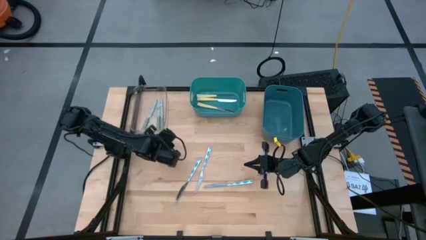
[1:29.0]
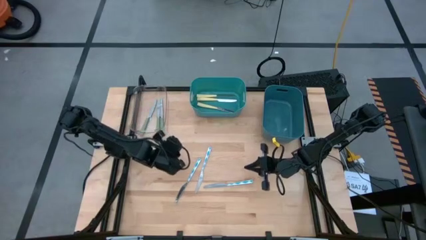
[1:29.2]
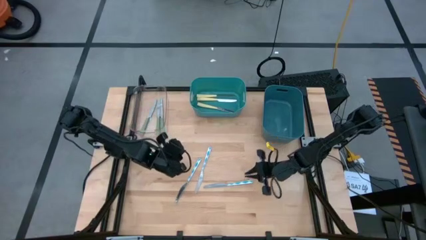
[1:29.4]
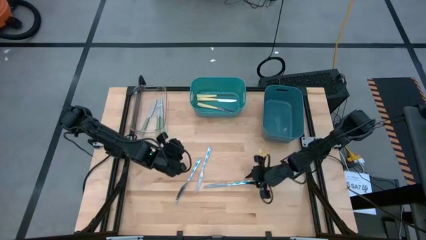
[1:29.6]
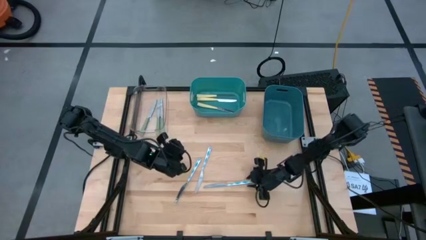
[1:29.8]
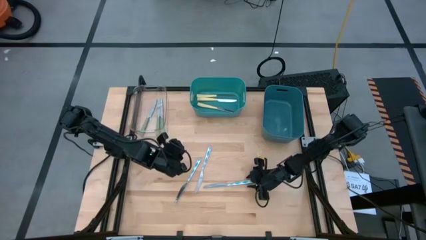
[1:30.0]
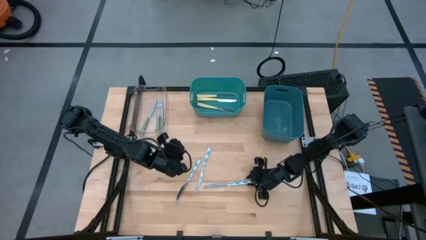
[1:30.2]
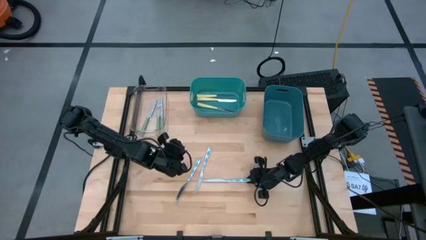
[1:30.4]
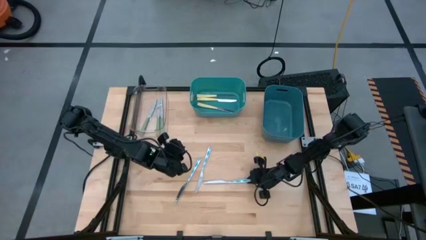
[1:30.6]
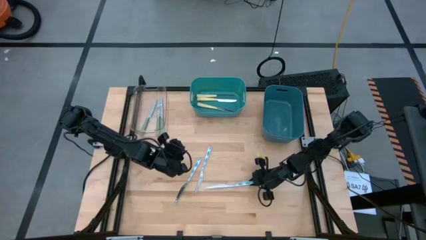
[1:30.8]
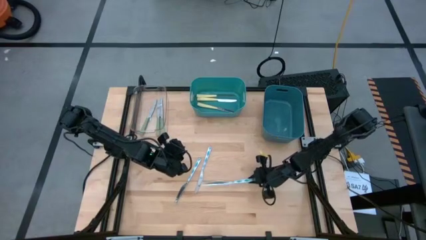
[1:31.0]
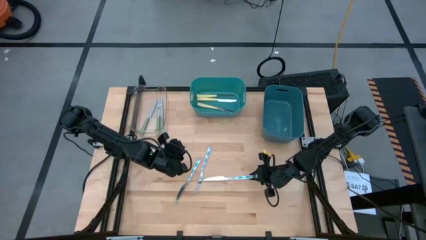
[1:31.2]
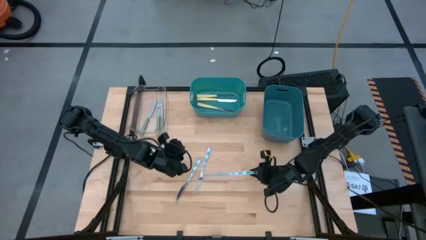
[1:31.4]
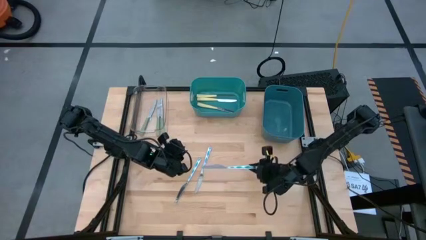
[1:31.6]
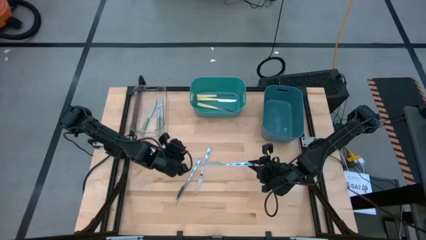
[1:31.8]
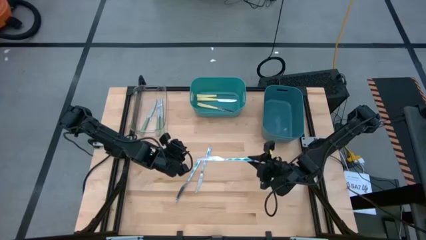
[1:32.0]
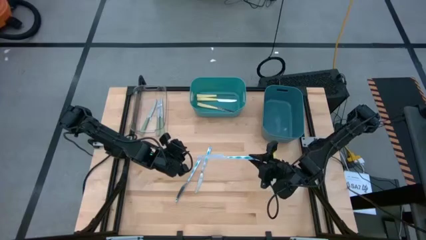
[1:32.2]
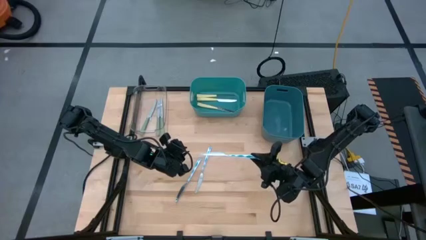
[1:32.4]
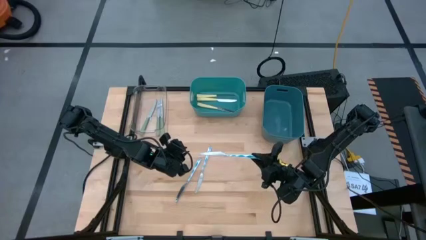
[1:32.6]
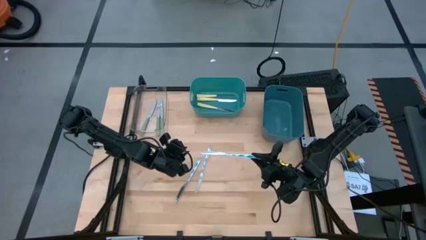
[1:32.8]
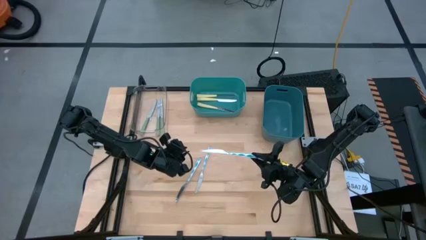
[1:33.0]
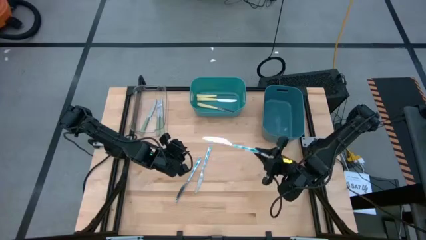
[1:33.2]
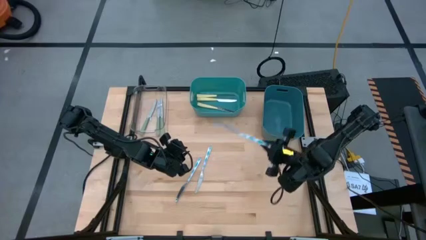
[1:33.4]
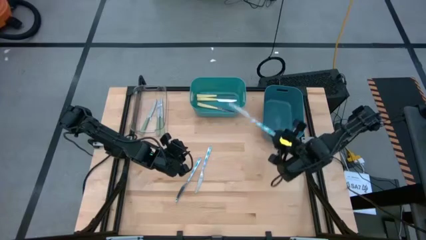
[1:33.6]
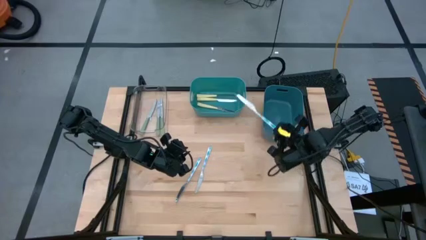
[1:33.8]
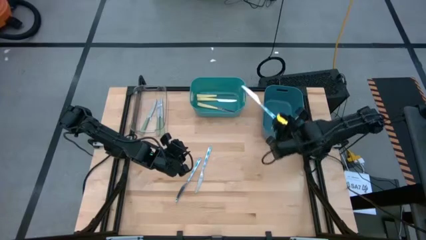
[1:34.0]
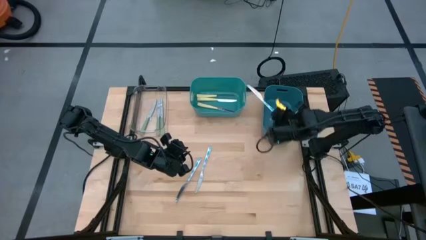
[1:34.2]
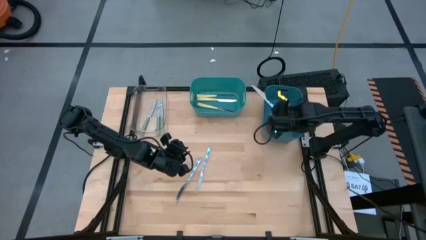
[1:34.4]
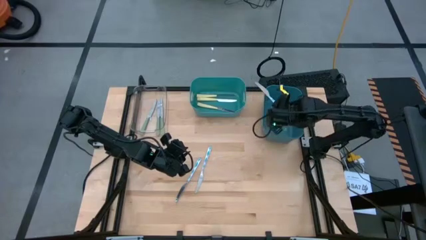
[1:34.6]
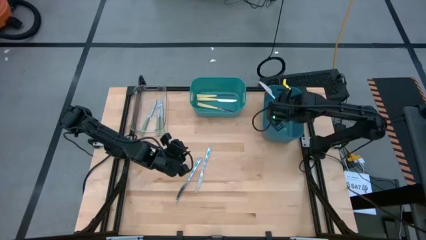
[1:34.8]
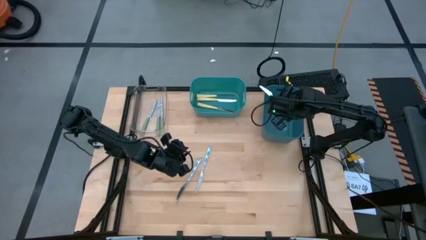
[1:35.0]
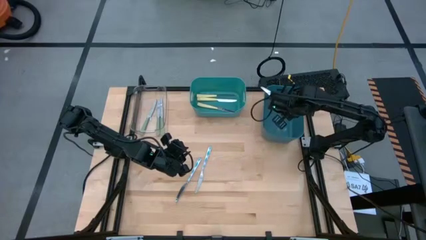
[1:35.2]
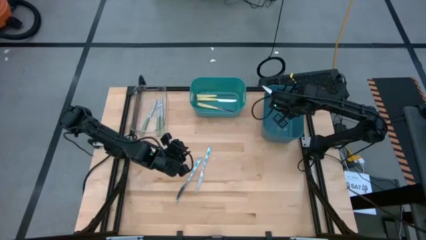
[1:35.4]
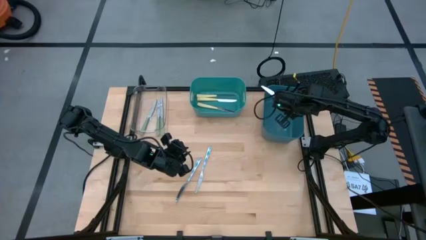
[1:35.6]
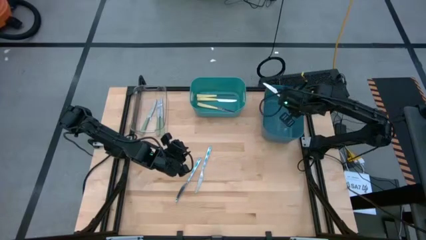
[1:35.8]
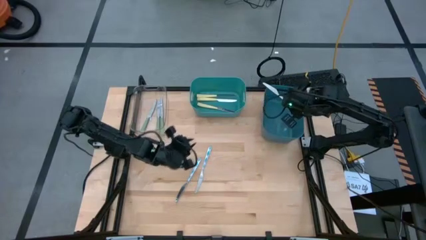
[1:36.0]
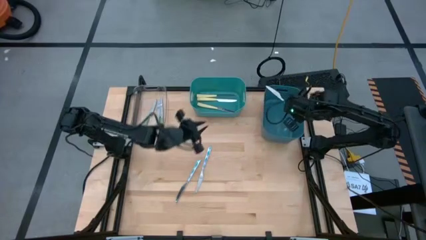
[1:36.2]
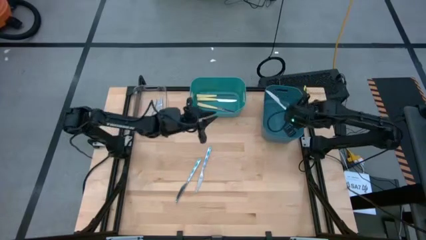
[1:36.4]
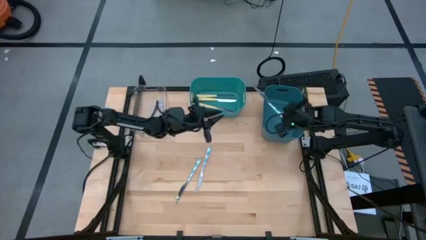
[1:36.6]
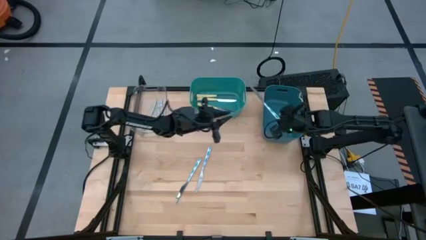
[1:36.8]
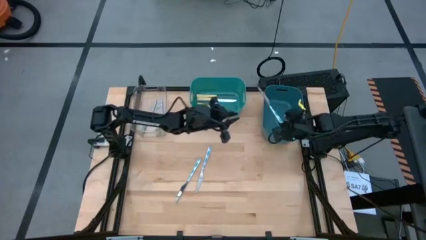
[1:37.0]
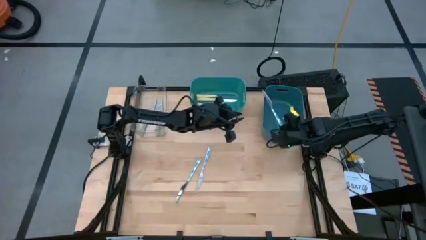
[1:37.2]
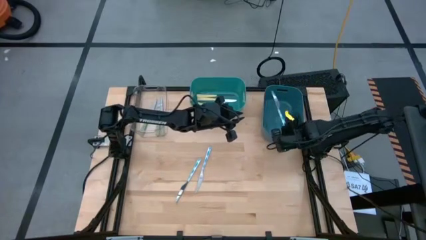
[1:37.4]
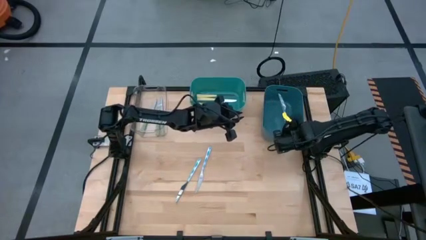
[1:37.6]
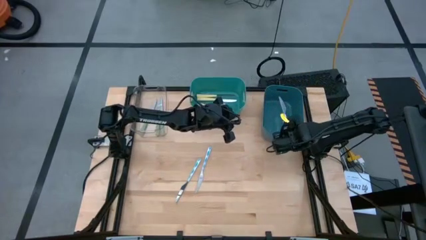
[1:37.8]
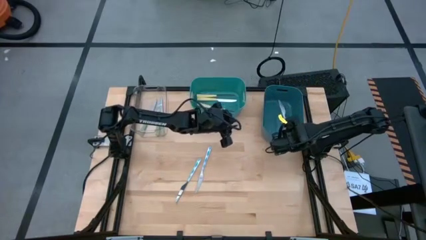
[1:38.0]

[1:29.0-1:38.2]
Task: Sort silverware by color (type)
Put the right blue knife into the blue bin

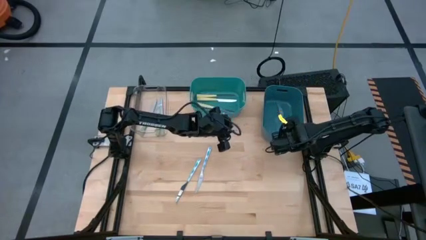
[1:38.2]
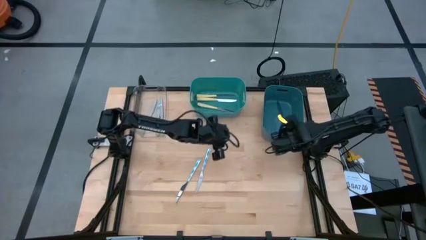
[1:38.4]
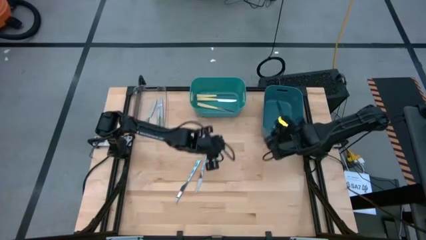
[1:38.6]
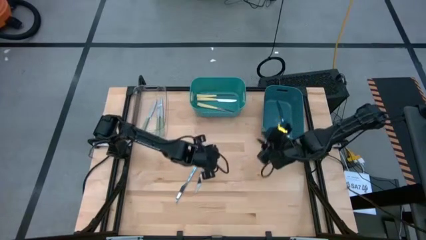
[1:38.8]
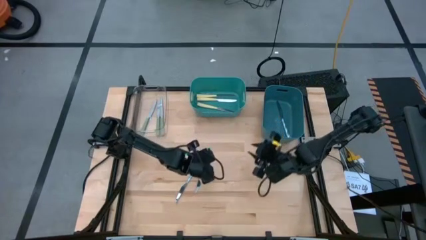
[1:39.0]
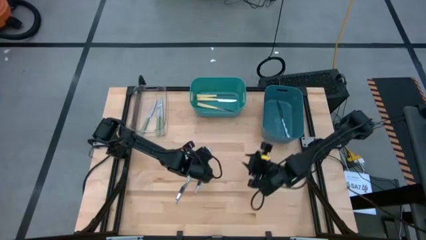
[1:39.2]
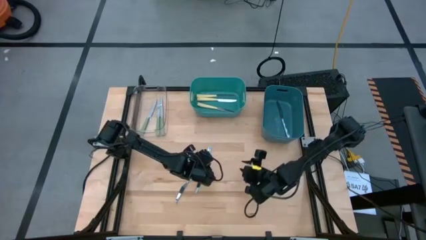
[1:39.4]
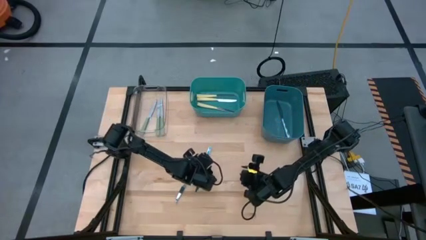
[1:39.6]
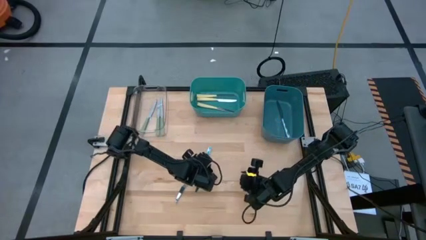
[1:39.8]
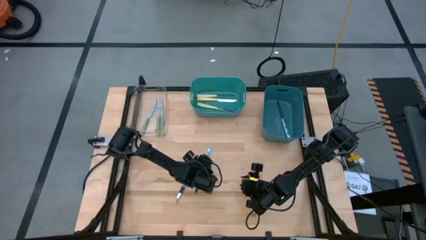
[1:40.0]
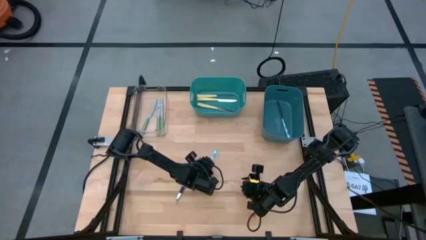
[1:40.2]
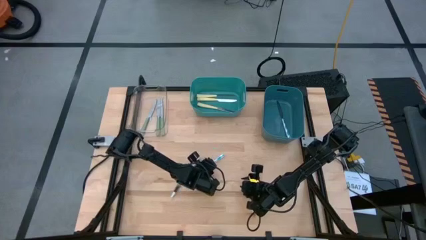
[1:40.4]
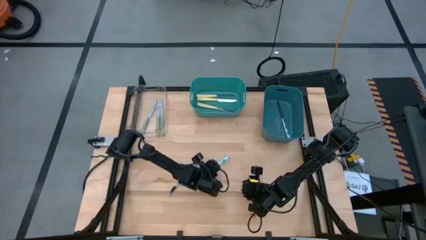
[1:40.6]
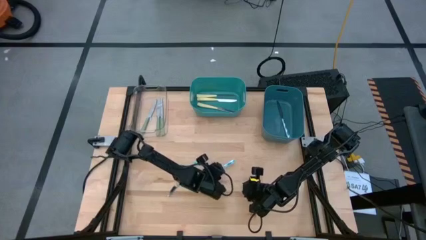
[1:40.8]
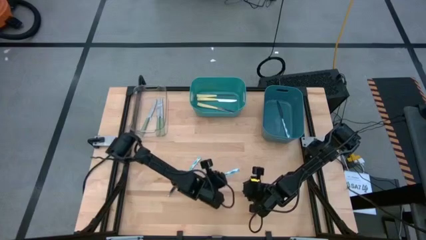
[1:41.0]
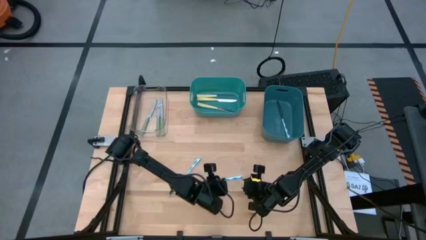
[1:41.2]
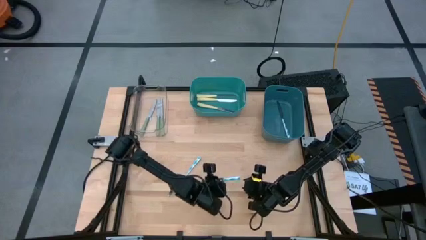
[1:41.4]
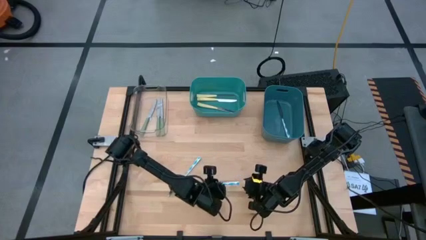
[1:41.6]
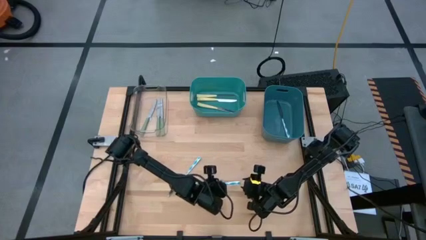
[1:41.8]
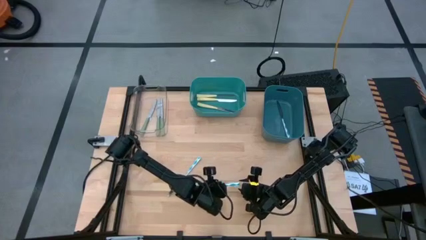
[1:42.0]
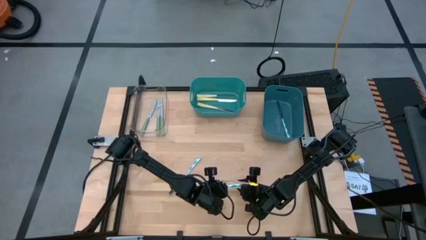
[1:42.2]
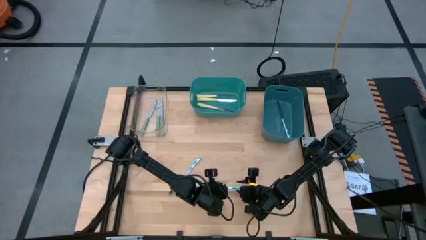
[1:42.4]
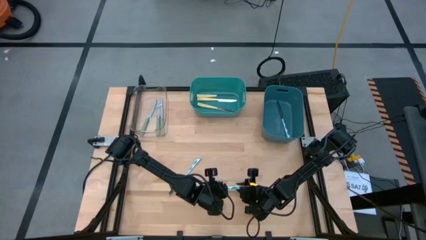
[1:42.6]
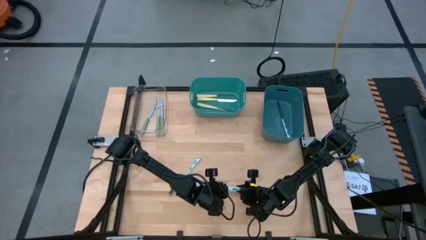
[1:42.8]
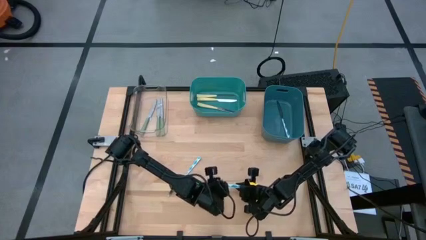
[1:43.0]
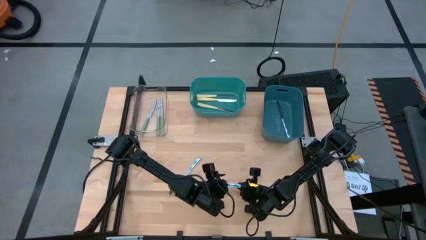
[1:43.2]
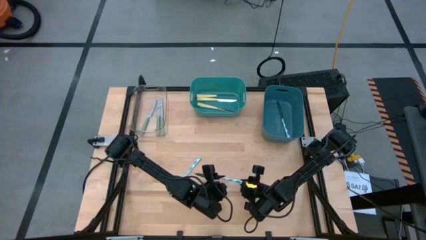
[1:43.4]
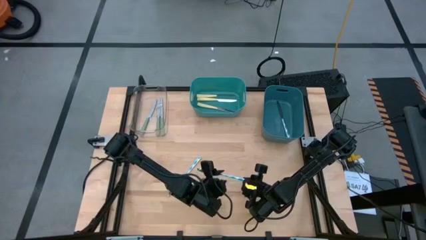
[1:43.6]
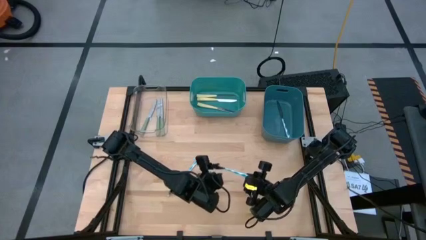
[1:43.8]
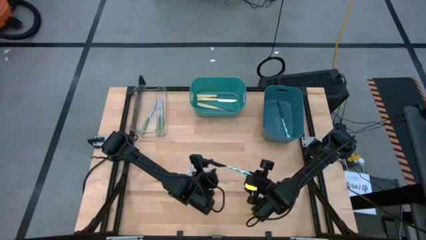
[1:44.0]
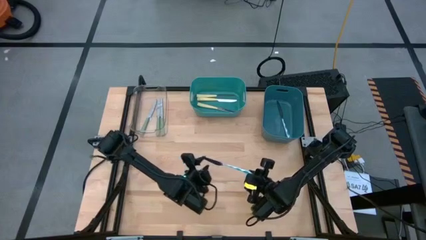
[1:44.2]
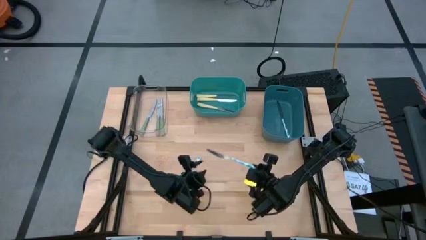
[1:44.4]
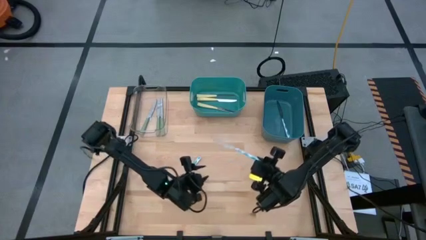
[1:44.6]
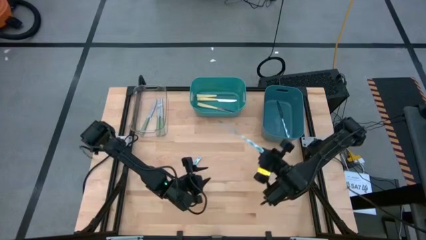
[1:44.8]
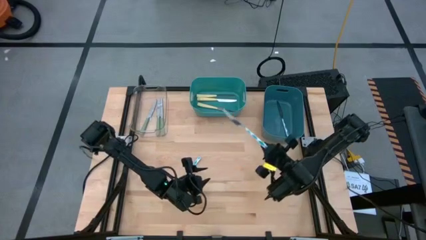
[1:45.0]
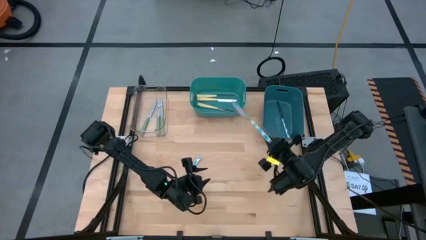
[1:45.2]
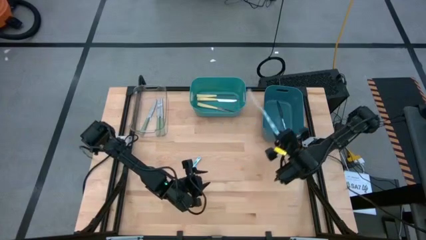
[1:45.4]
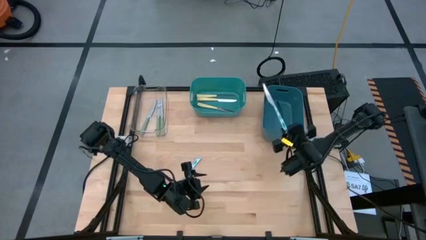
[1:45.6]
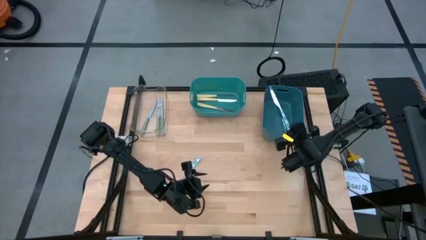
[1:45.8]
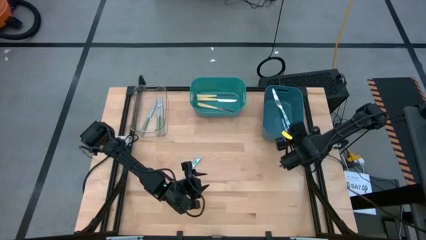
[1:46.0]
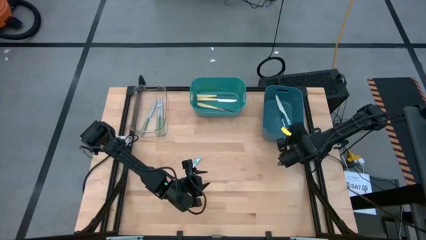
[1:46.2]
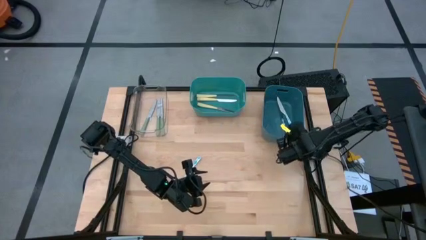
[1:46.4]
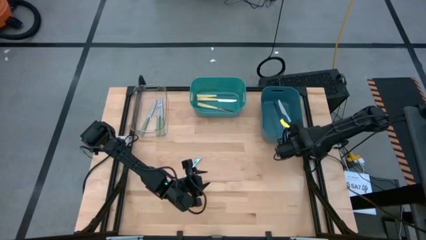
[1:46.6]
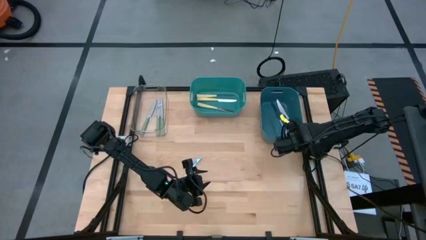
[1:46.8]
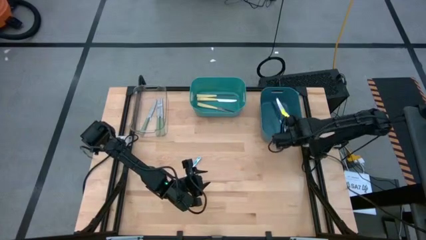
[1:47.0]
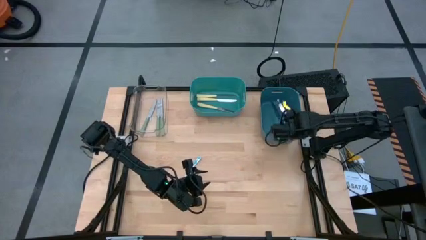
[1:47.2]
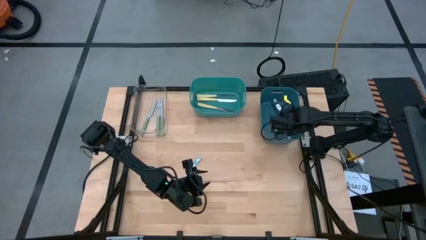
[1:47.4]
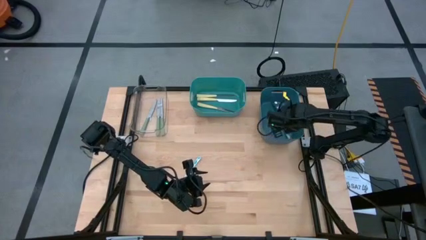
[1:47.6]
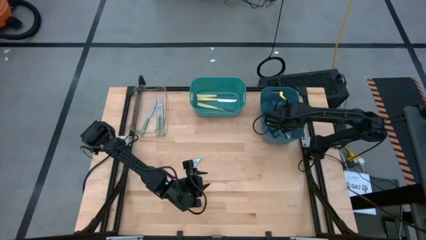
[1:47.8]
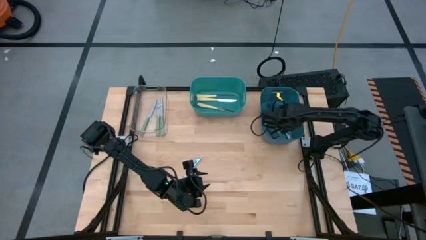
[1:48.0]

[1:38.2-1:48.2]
Put the right blue knife into the blue bin
